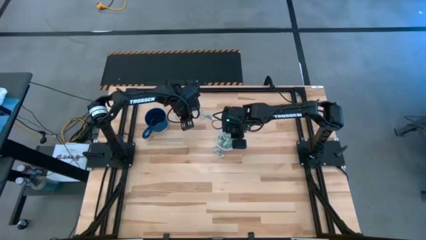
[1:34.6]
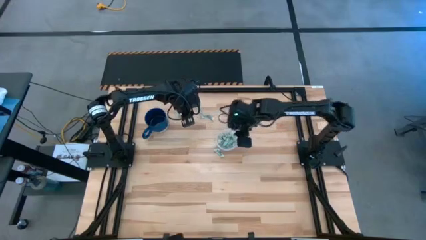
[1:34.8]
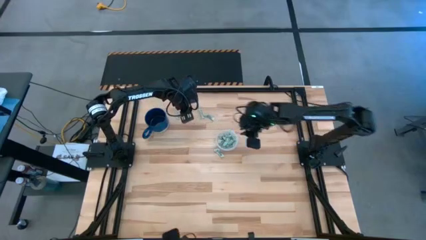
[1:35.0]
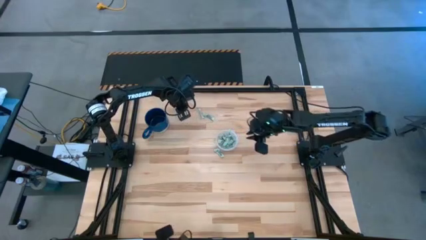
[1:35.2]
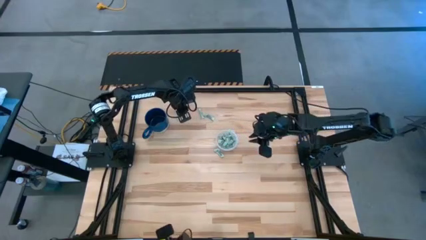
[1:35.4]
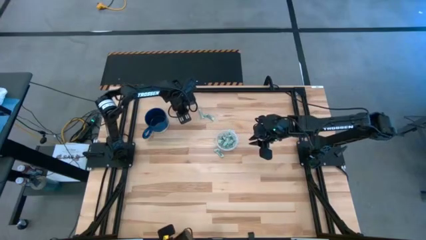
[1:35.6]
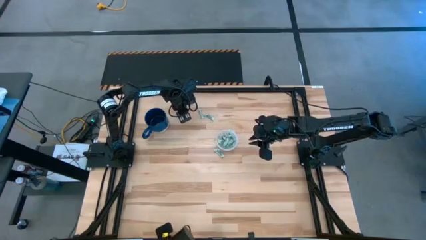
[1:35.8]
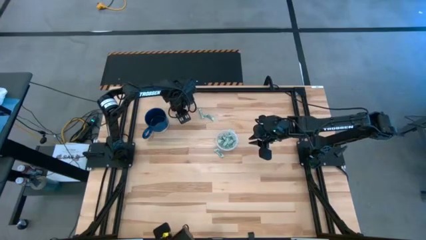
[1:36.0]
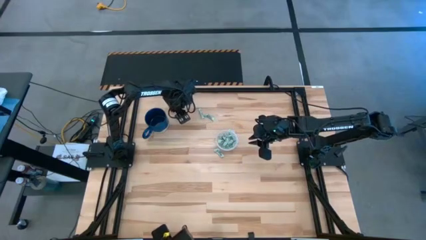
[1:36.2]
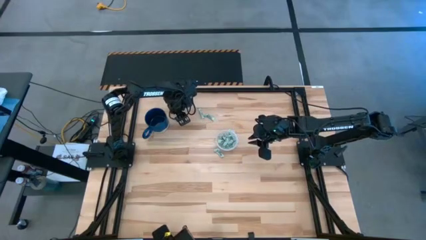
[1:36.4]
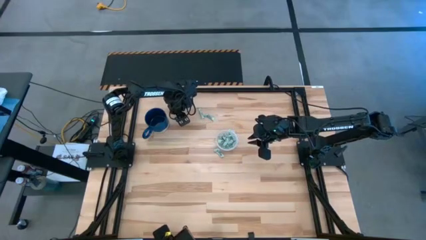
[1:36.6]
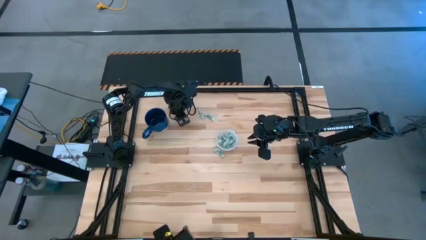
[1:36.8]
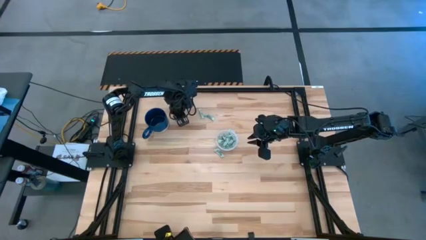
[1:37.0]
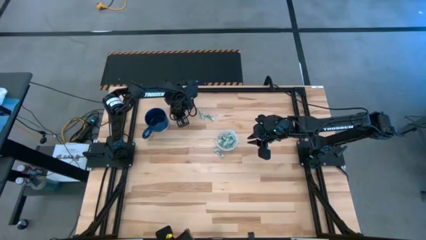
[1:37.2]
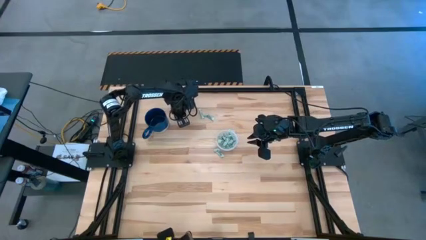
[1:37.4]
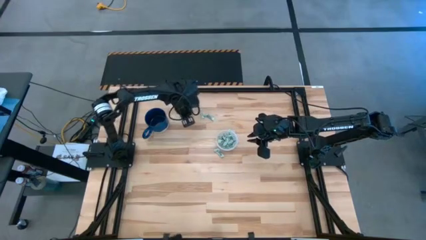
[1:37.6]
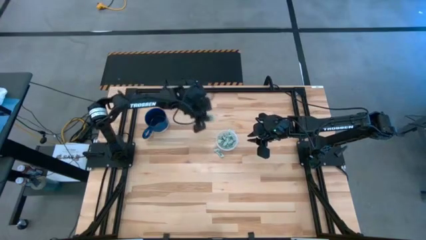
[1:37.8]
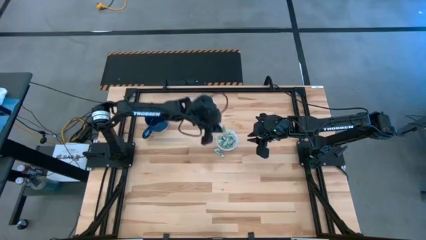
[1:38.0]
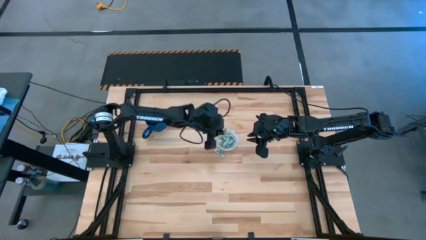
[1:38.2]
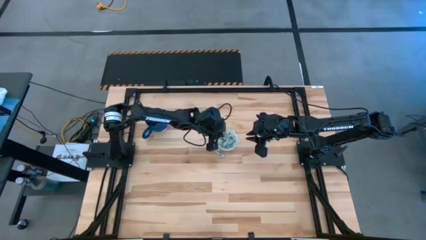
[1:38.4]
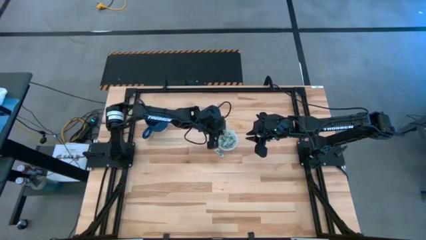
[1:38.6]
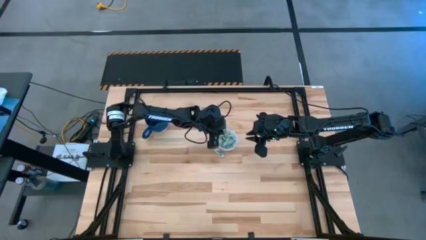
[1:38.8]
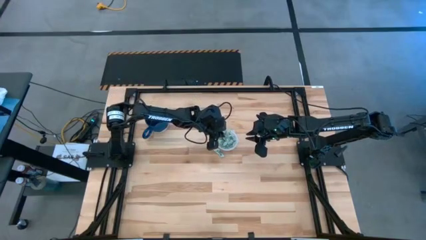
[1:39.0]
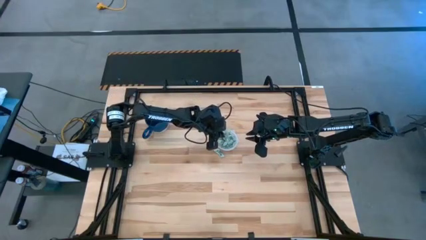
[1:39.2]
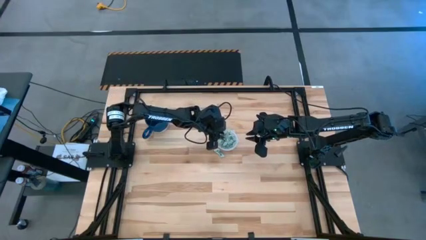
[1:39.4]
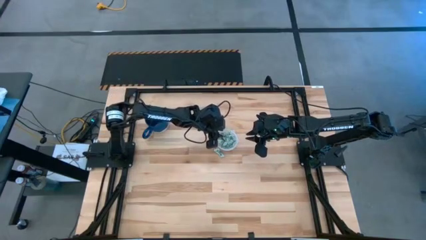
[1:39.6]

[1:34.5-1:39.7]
Task: Pick and place items into bin
Put the gray stevia packet into the transparent bin

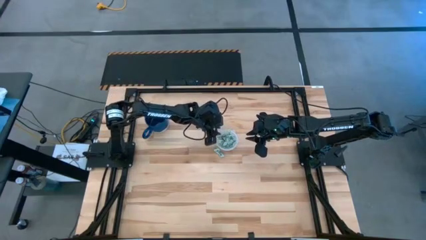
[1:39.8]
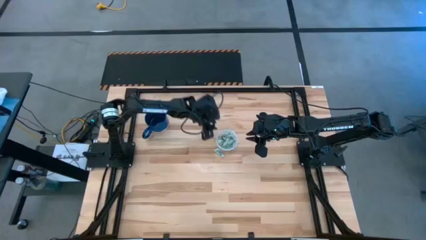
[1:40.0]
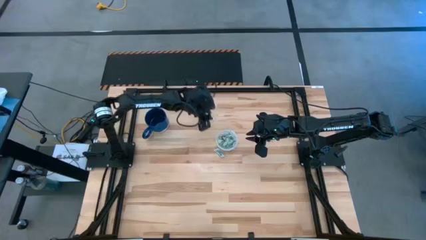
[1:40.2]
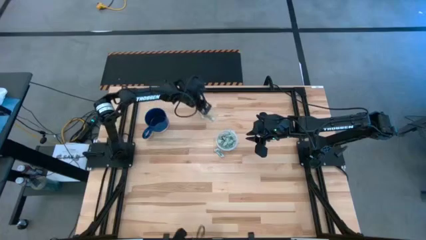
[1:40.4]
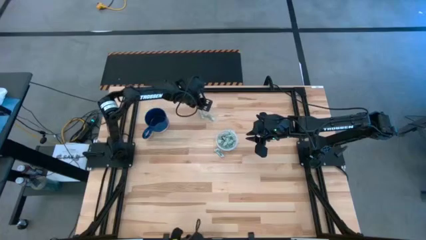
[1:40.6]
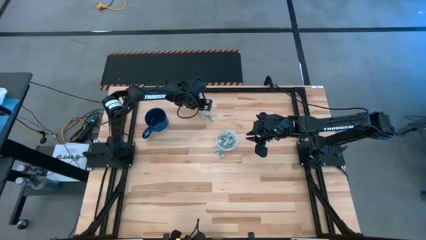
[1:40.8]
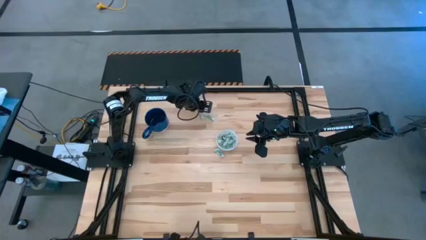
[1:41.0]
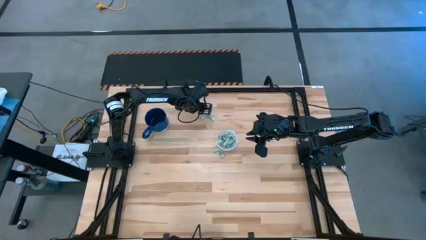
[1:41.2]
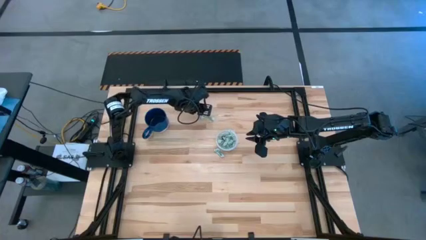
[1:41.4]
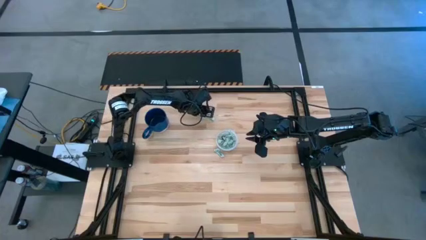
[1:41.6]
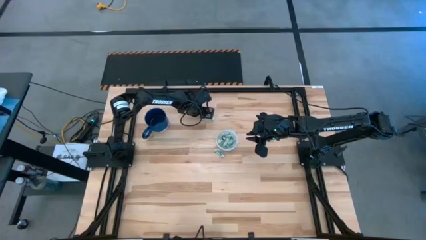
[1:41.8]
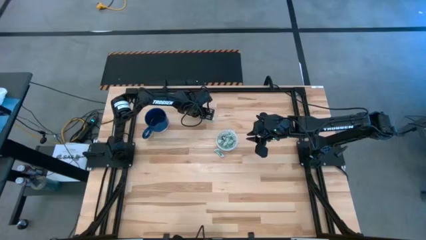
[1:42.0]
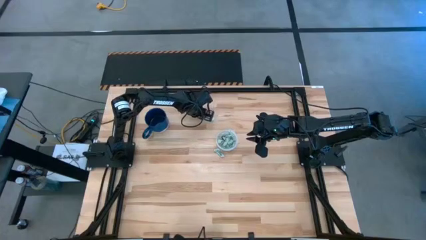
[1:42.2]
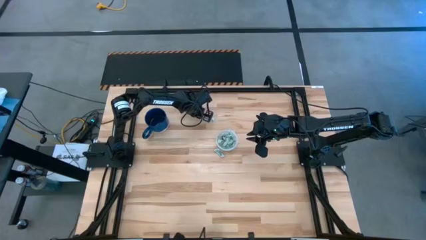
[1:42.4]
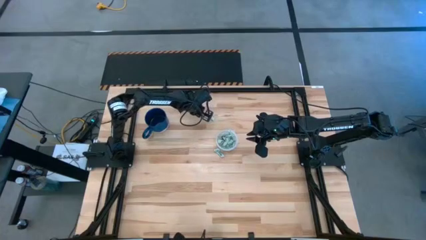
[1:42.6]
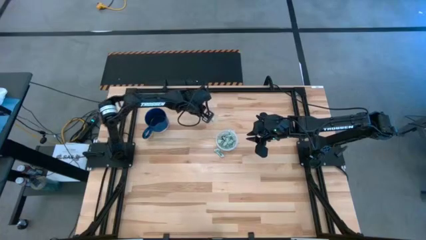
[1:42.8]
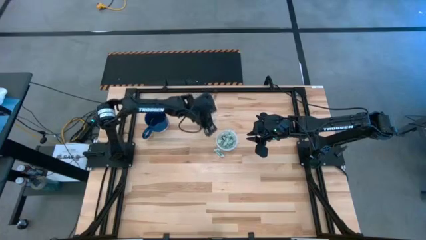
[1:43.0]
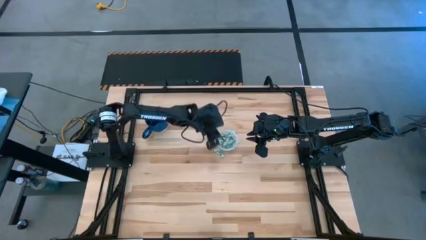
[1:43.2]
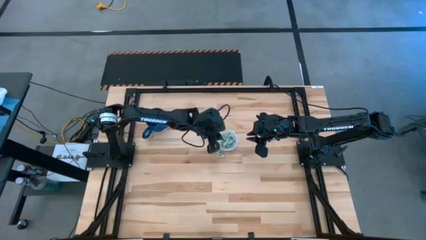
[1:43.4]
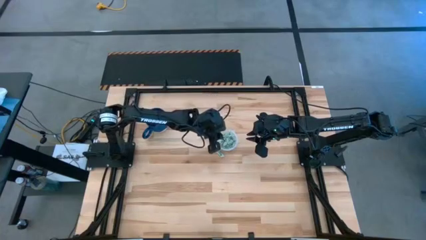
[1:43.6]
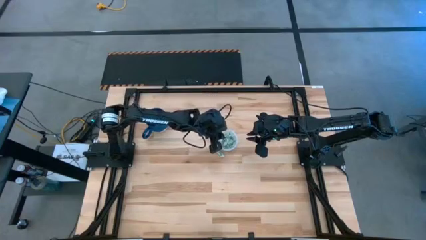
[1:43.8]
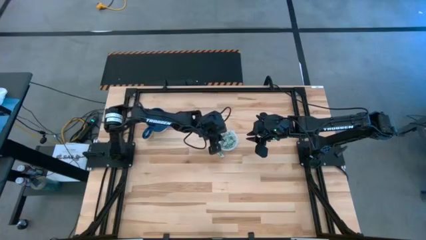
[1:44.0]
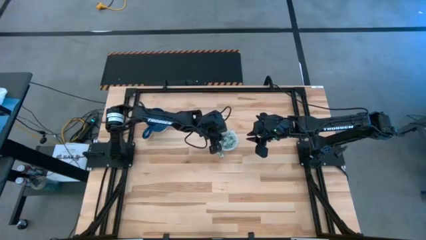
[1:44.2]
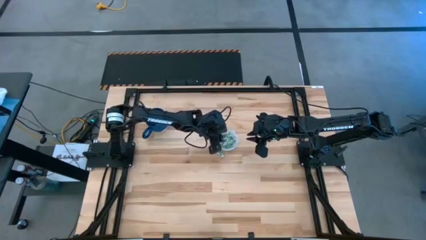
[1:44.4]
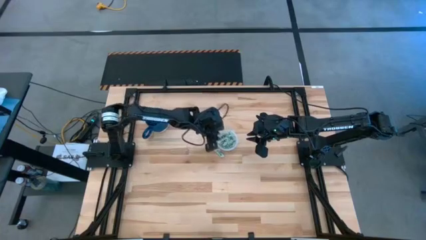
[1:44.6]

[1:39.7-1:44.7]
Put the gray stevia packet into the transparent bin

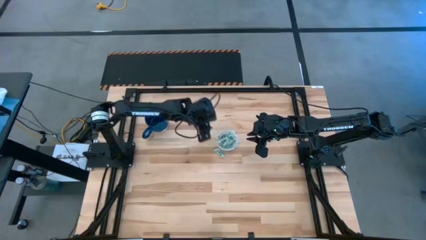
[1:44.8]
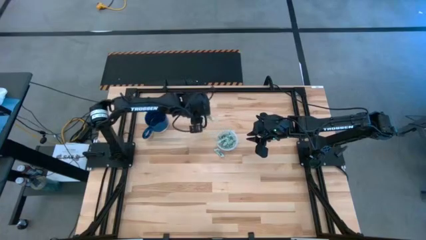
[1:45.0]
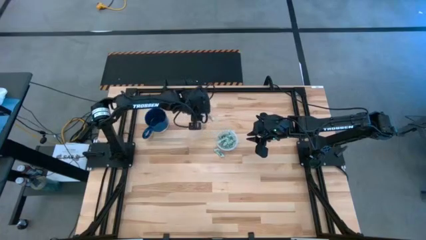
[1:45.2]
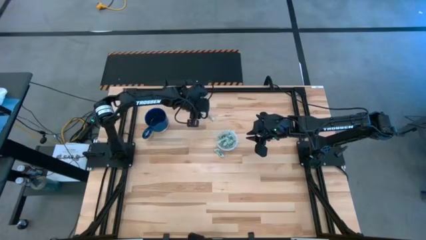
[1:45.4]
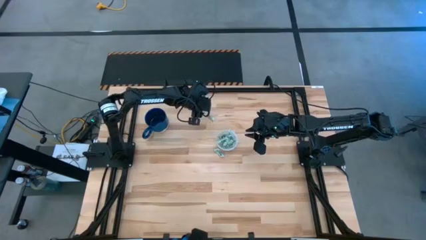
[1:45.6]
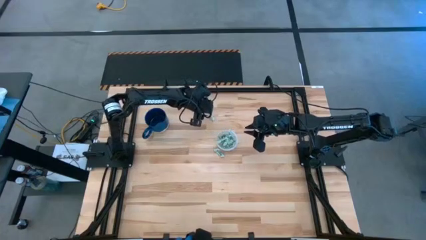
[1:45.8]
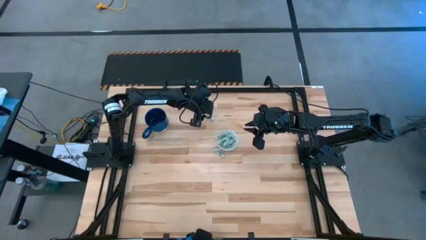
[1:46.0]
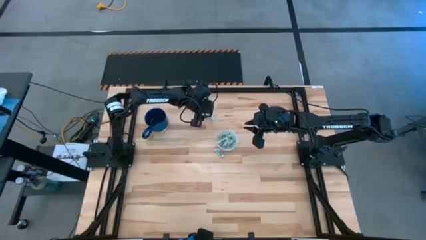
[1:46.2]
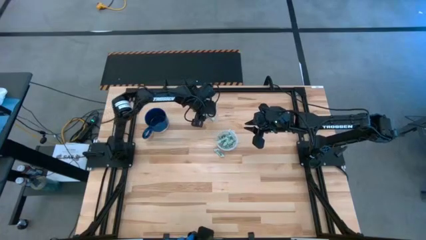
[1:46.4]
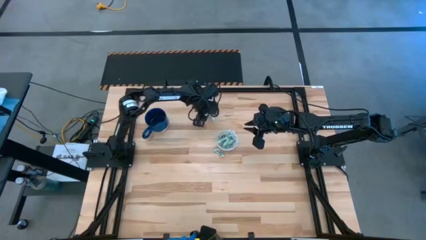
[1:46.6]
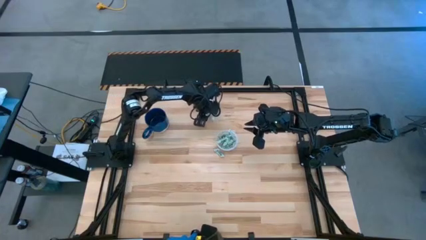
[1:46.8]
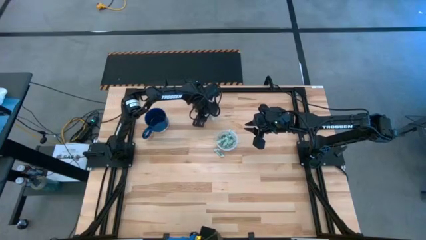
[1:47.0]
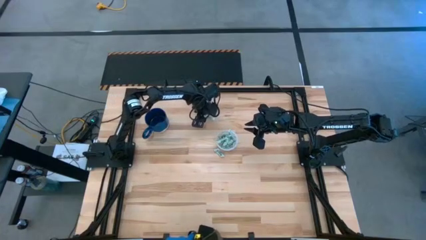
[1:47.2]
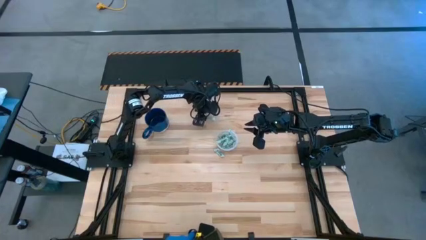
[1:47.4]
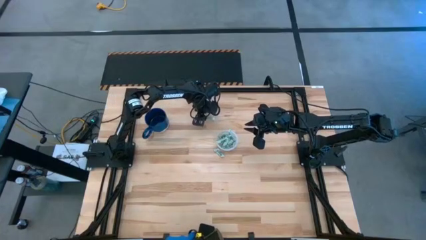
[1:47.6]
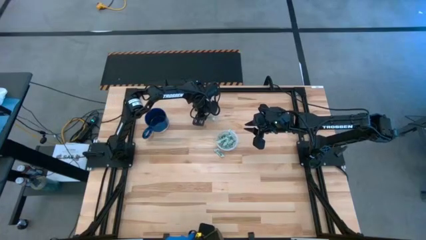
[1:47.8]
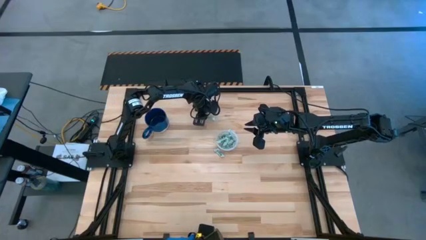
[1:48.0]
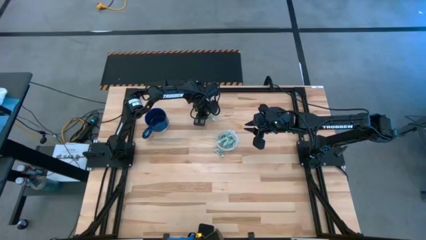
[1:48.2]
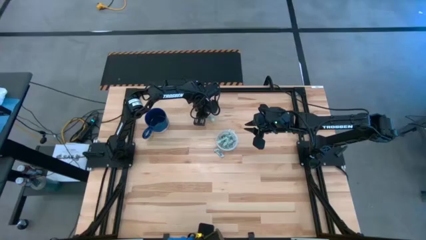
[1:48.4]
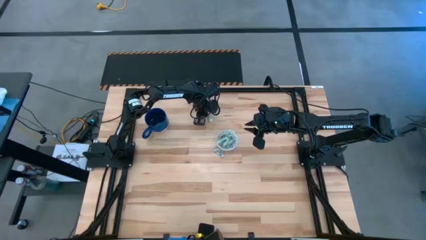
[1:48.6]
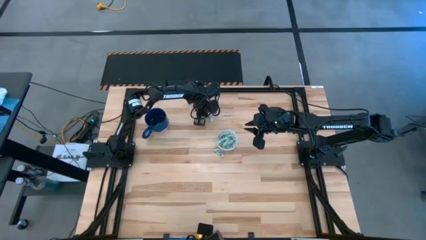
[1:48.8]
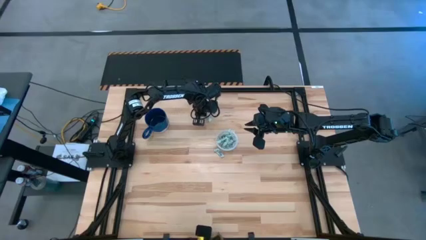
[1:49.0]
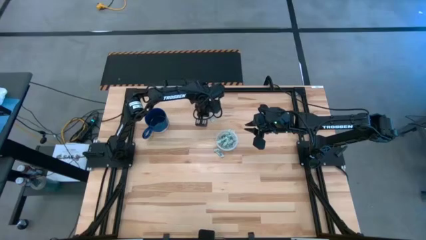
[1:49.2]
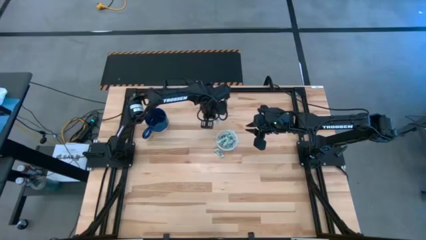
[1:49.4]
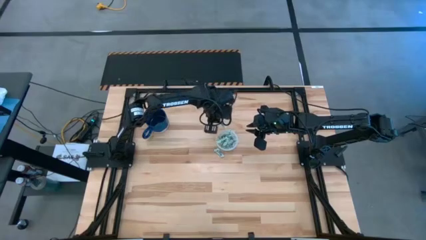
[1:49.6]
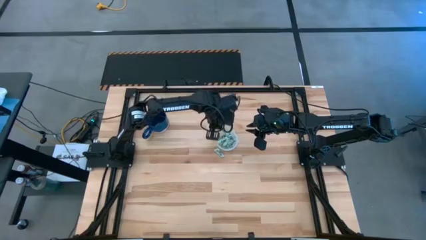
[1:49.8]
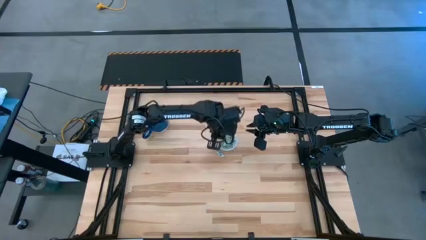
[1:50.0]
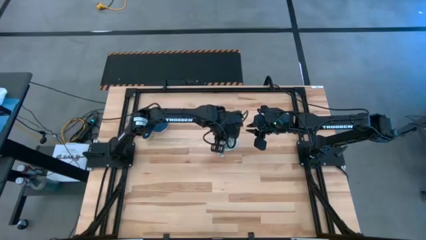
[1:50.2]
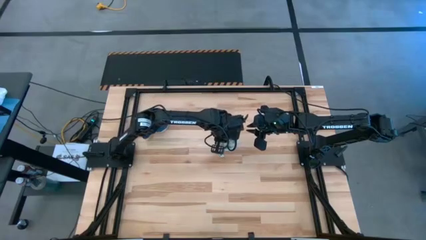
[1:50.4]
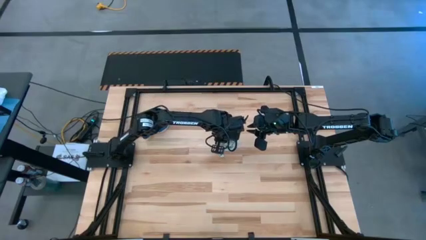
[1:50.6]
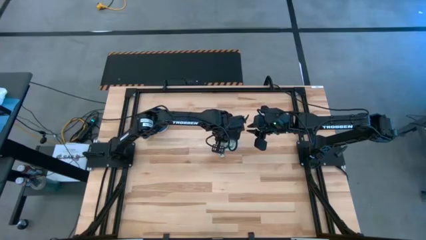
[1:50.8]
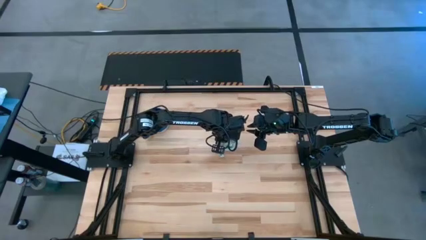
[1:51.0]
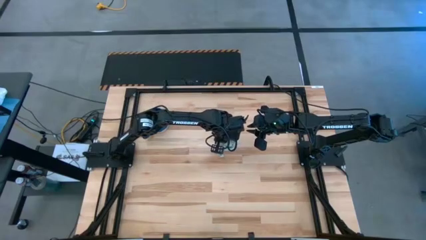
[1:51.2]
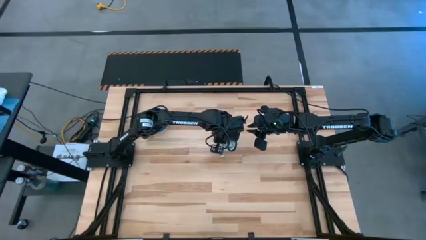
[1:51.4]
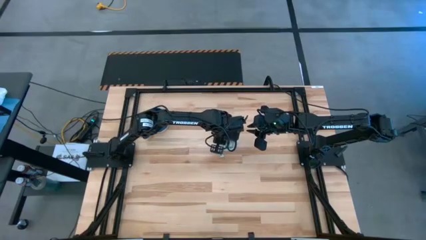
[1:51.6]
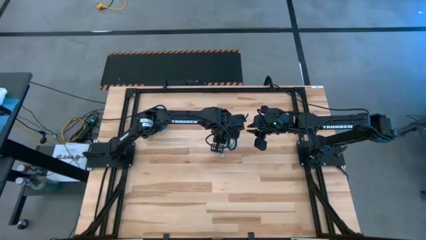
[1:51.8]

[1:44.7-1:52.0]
Put the gray stevia packet into the transparent bin
